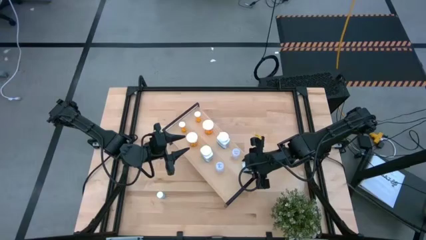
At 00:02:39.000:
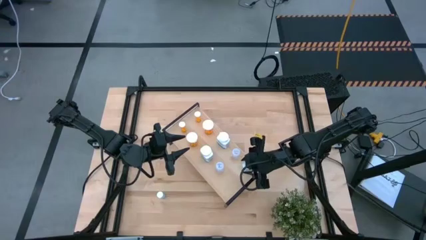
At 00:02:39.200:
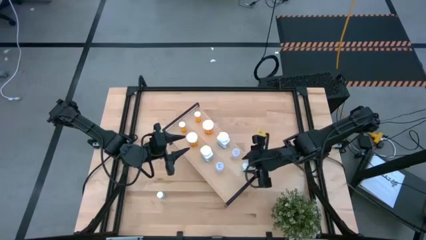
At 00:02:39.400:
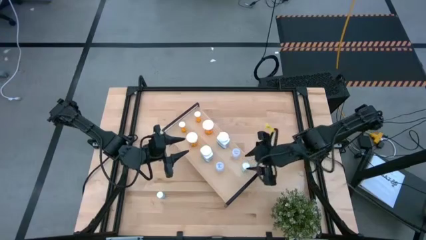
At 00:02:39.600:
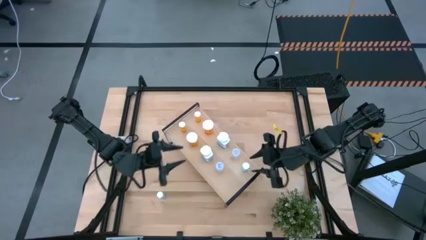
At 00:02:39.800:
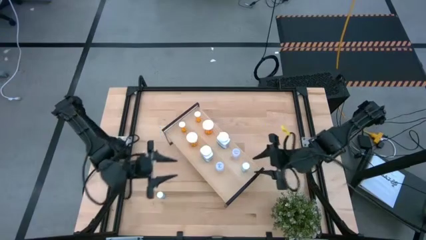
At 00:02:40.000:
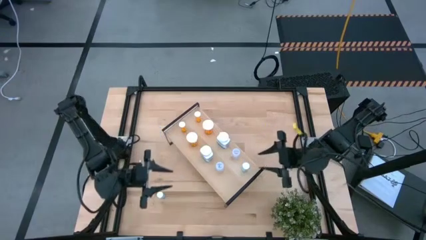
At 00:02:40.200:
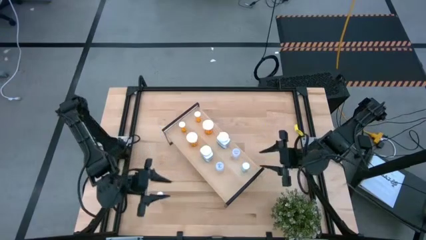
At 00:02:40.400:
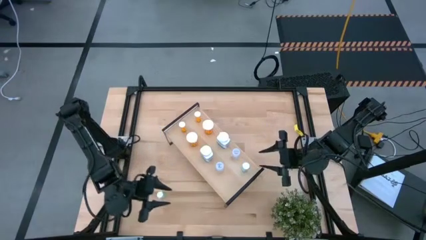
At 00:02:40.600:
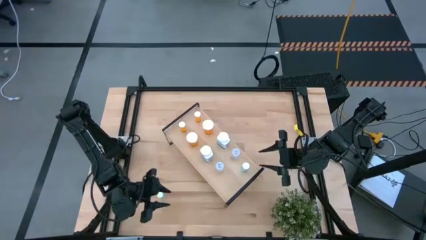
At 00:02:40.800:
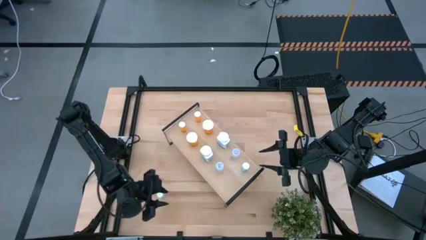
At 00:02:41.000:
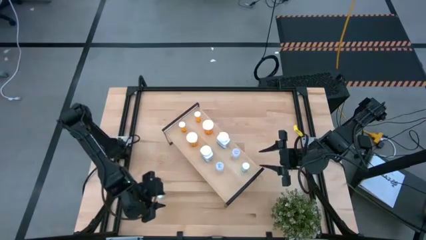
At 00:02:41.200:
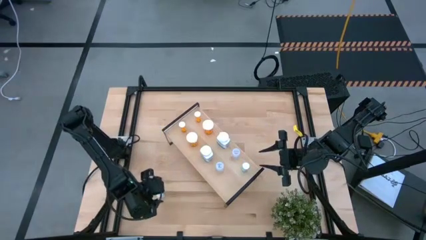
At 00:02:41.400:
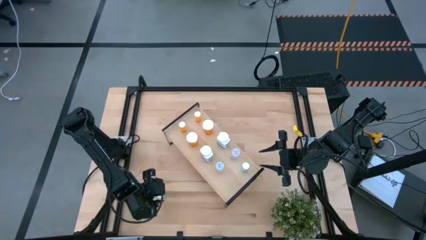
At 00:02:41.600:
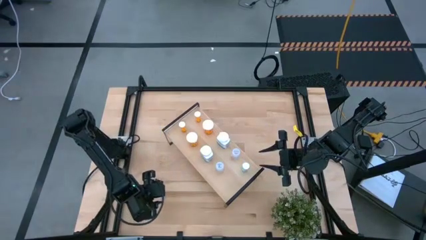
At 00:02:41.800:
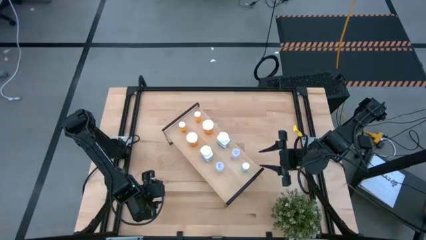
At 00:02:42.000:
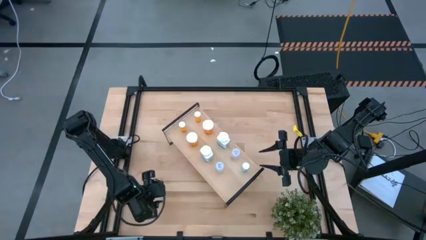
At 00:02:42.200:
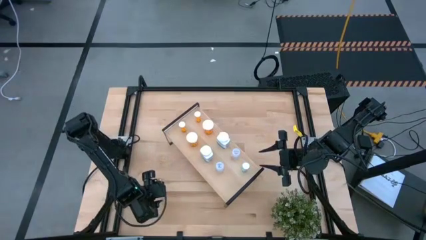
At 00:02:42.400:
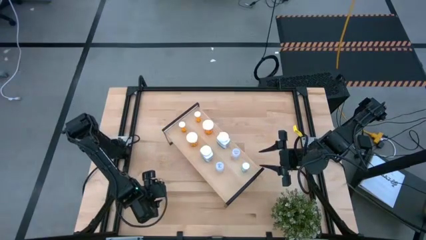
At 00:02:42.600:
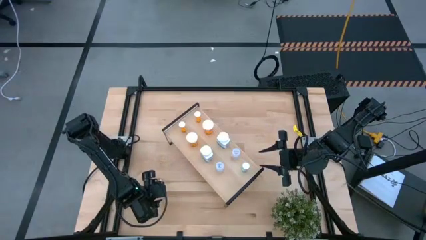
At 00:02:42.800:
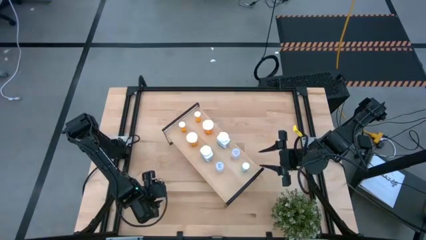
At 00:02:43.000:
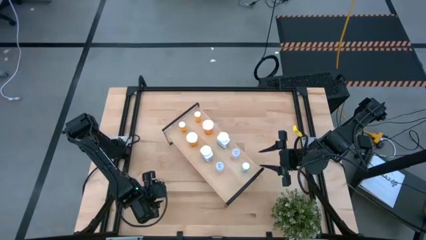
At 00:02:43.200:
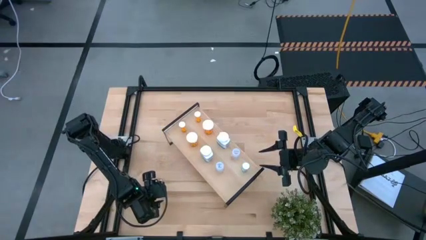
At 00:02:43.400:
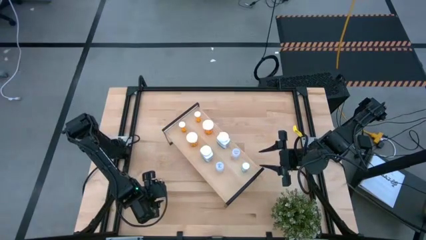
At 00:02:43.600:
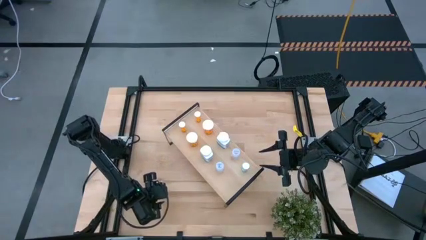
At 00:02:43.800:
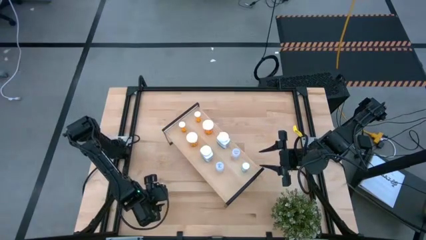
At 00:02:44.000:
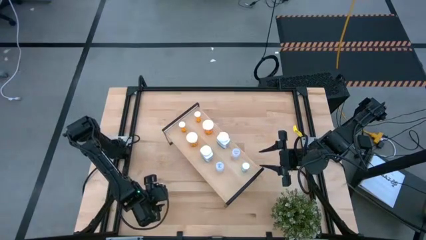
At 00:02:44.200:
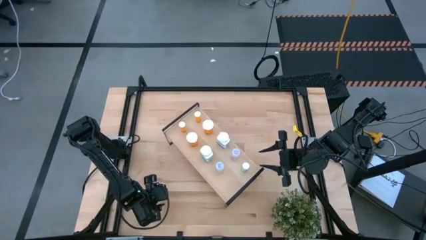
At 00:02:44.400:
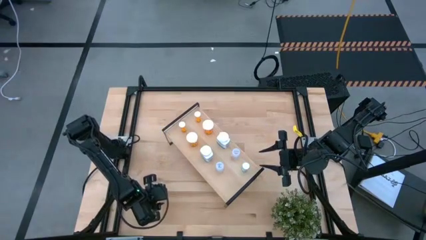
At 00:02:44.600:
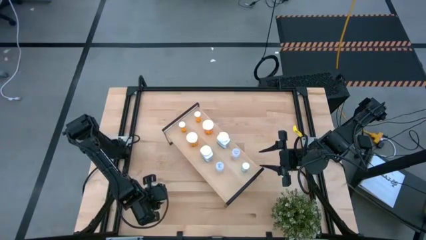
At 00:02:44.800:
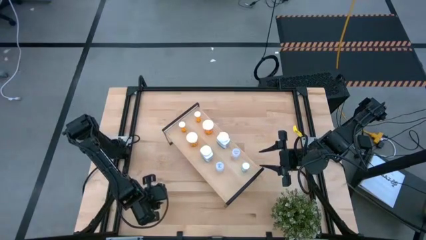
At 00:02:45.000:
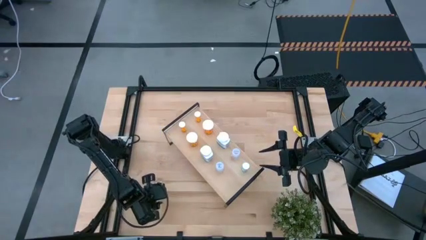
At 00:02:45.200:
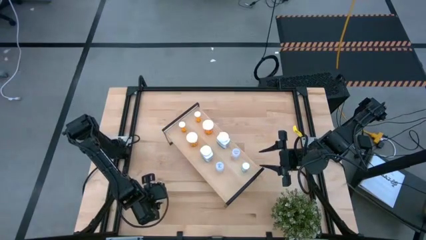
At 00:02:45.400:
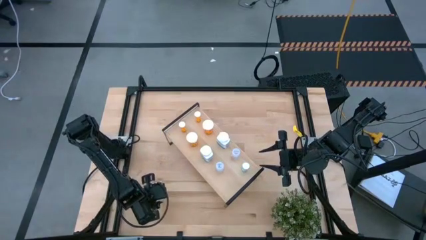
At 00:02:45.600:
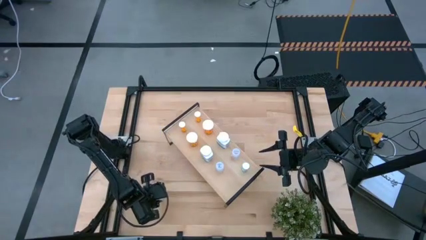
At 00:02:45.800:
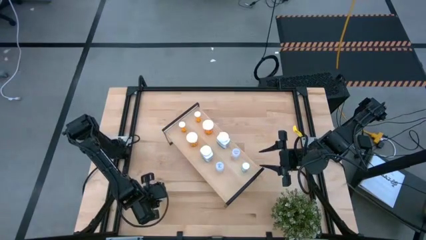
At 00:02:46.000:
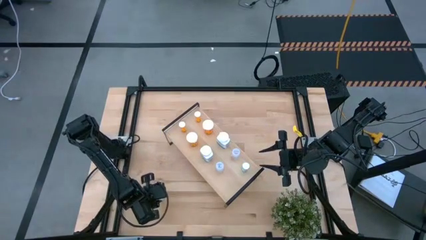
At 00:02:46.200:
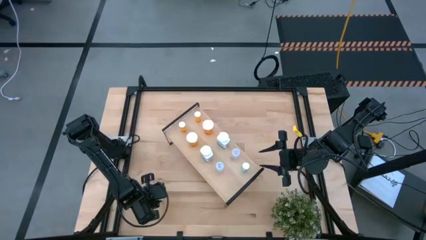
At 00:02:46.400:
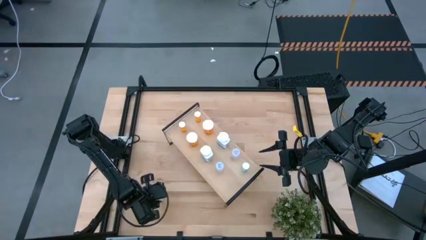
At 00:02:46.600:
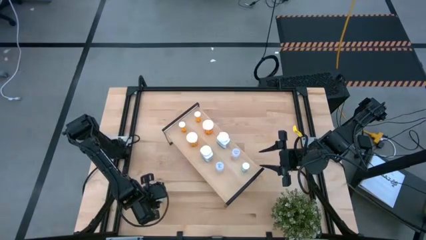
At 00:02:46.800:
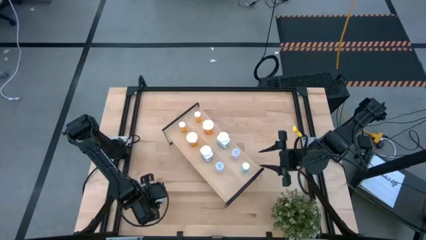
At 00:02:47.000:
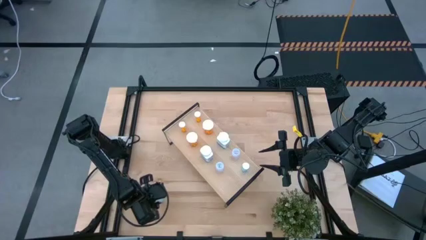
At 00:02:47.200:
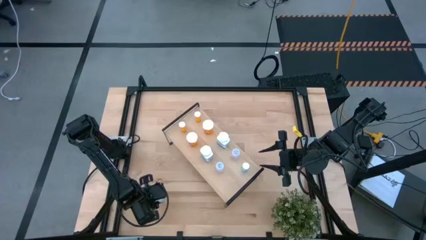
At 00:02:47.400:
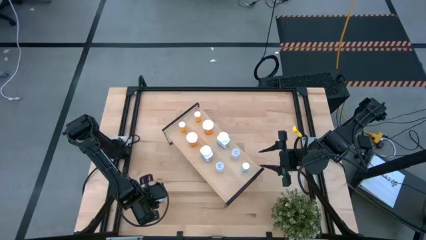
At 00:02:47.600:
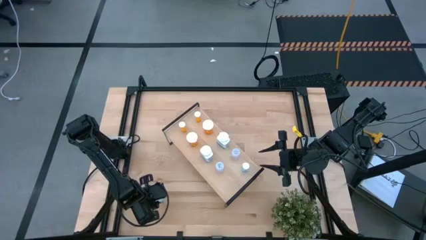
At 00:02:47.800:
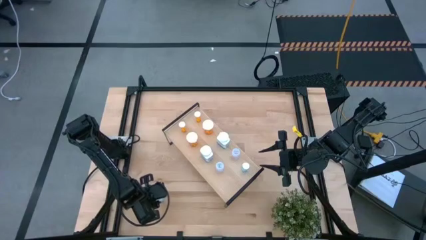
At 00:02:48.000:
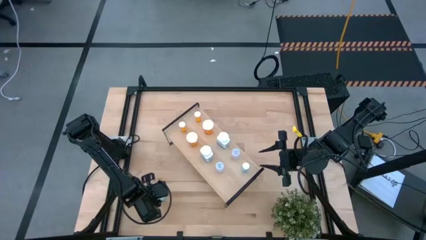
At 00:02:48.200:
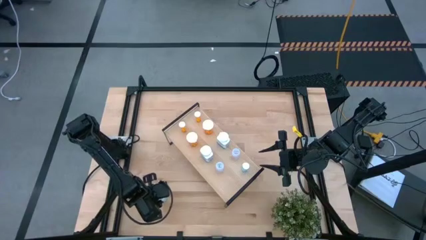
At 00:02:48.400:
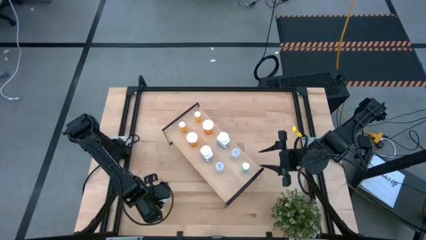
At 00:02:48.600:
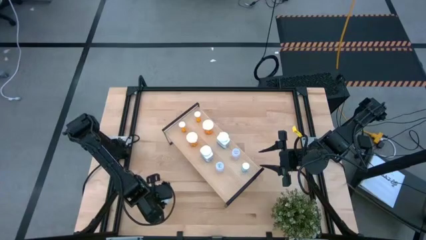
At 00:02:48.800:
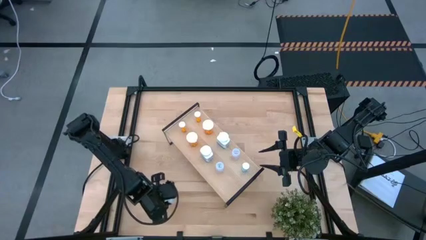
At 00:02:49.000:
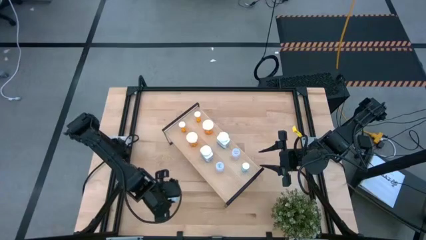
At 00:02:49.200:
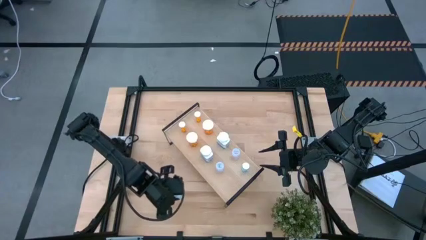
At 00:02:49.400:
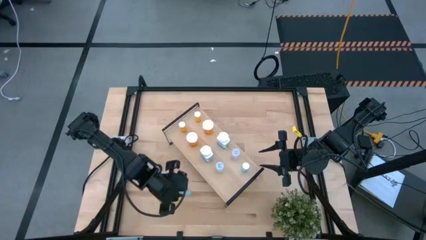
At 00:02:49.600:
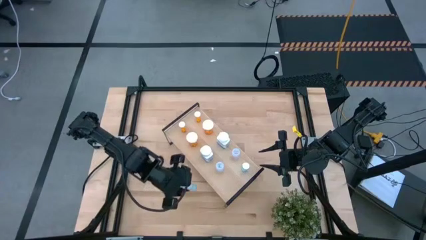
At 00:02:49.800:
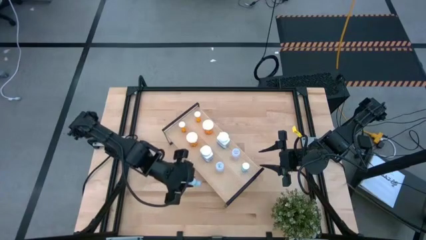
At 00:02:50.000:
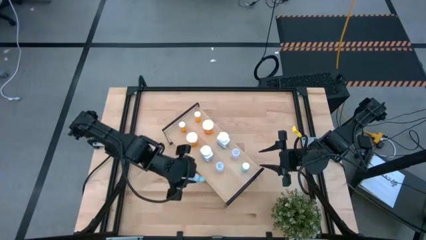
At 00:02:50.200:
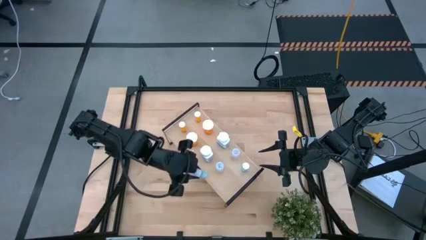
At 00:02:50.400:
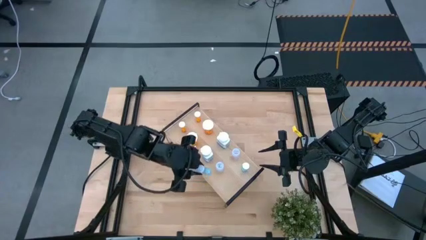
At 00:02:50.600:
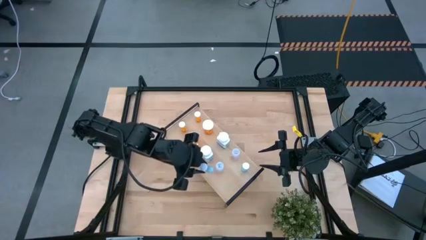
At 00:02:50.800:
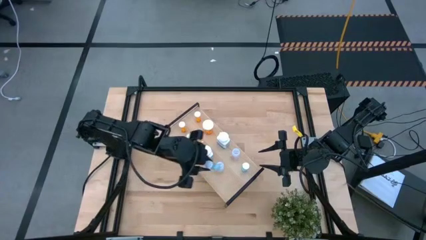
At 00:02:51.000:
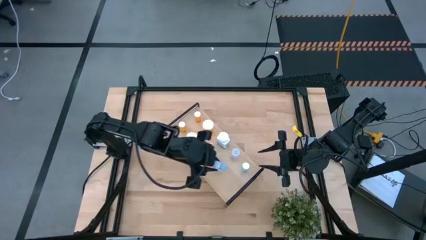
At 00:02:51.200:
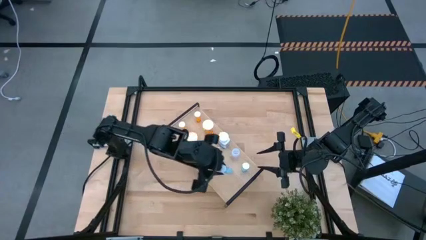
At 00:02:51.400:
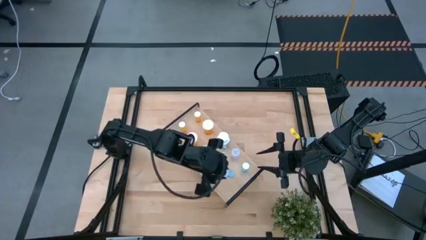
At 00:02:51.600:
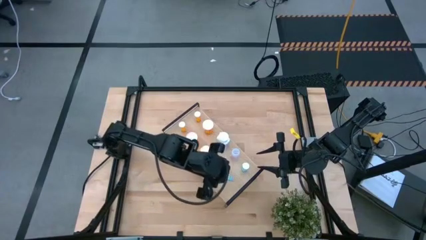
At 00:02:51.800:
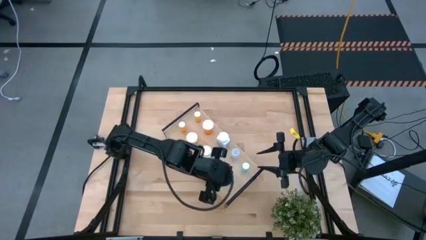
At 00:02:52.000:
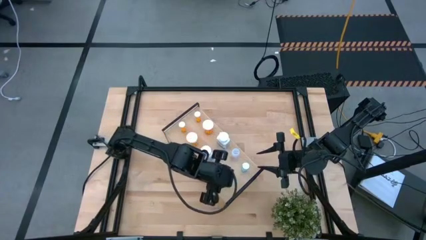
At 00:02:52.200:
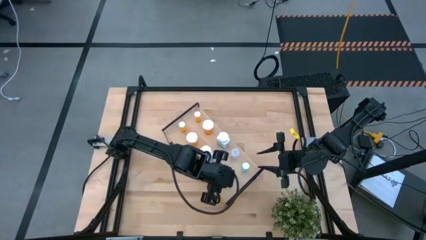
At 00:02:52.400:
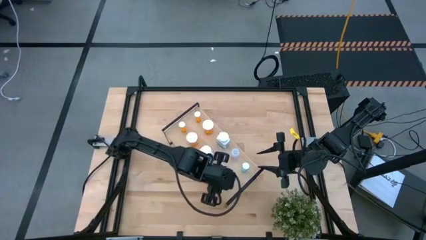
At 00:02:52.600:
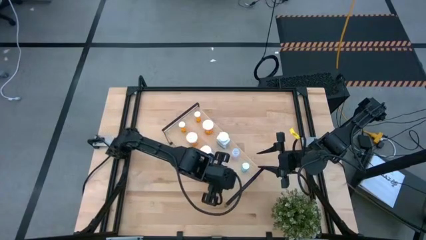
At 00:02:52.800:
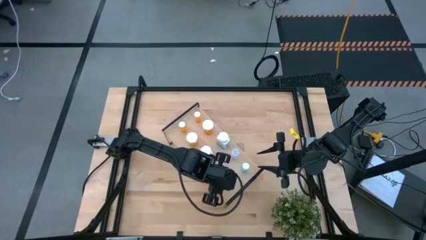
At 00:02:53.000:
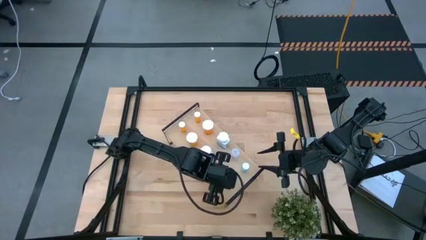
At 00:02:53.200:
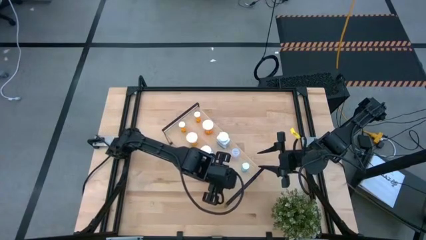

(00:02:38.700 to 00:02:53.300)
Task: Pick and place medicine bottles onto shelf by color
Put the blue pill bottle on the shelf aligned with the blue pill bottle

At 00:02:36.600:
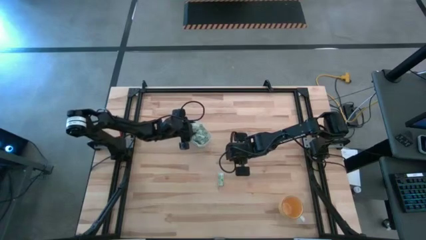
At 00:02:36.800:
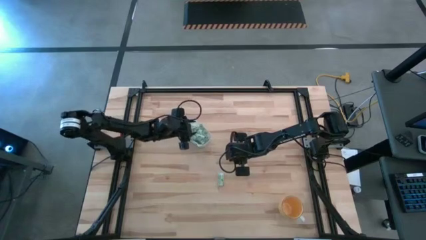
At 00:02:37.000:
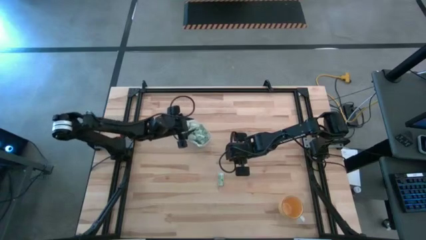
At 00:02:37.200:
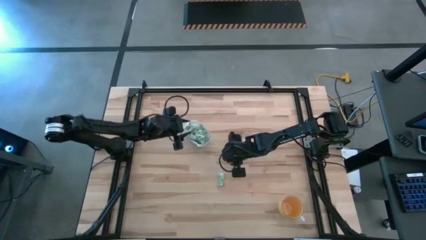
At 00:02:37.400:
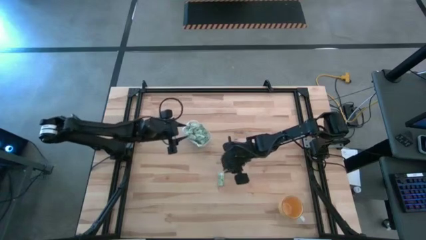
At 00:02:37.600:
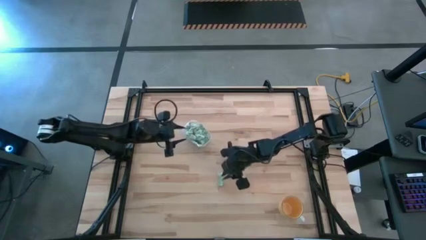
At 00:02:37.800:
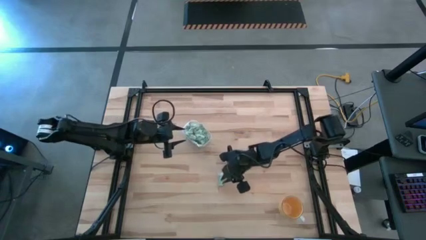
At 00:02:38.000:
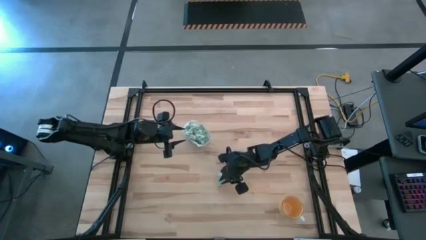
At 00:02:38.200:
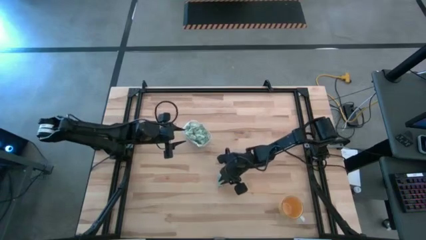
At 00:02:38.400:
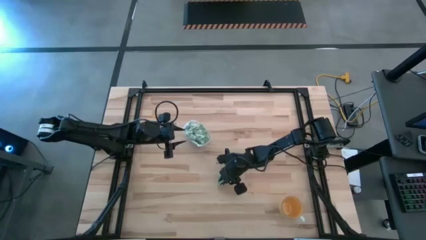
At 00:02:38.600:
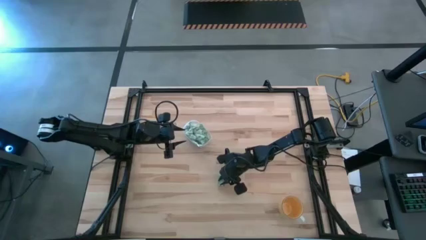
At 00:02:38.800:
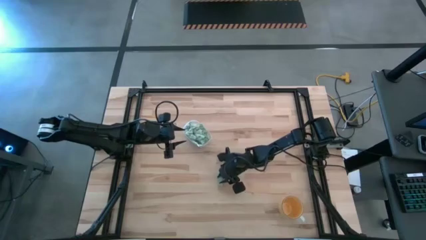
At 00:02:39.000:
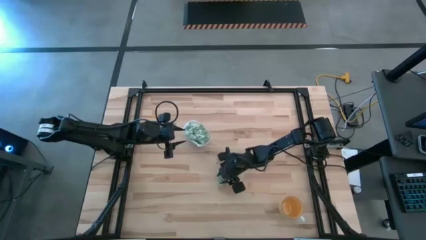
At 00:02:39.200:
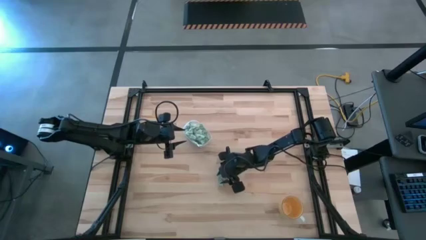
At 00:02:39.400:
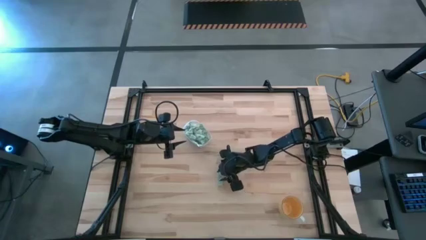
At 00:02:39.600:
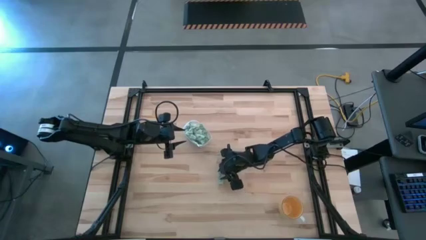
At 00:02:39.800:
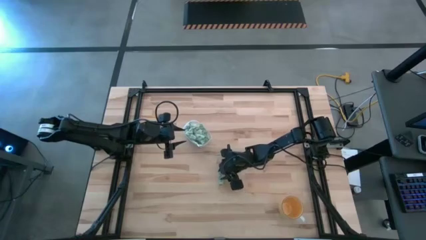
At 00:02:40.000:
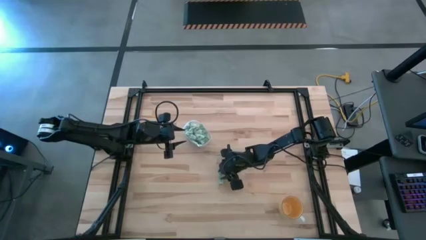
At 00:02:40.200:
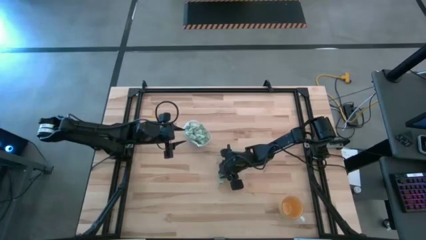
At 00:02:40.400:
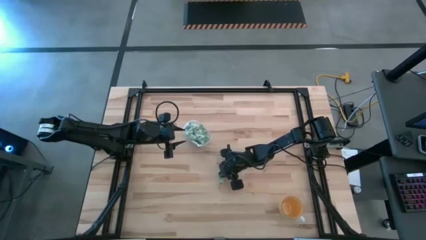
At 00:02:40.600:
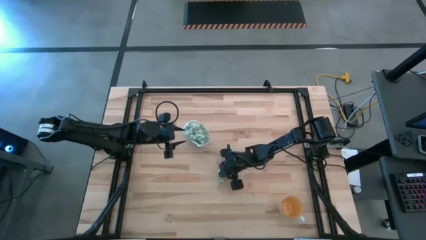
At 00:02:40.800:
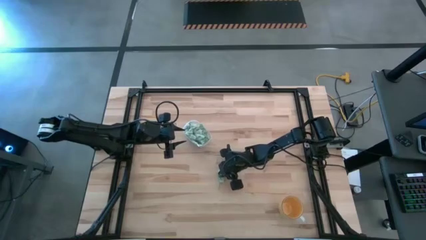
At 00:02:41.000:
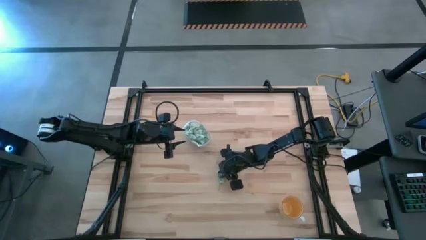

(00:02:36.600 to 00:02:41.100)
Task: Pick and place Stevia / Truvia into bins
Put the stevia packet into the transparent bin
